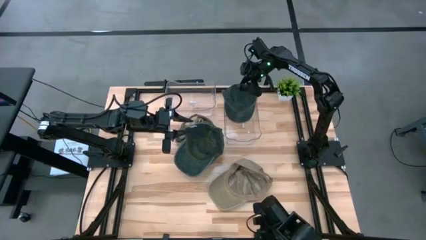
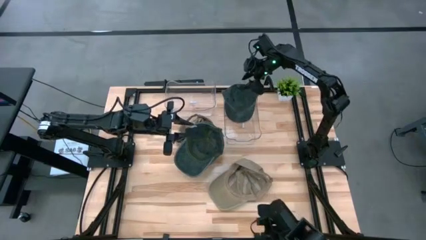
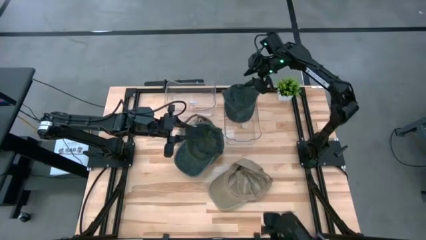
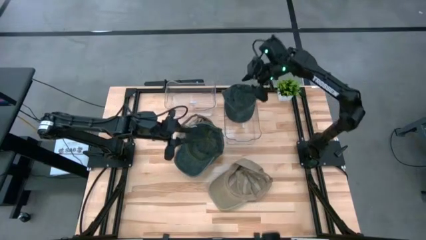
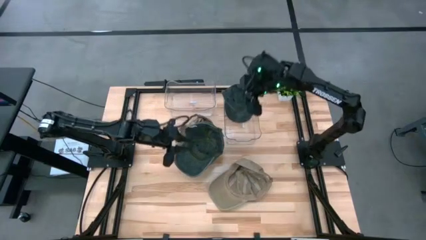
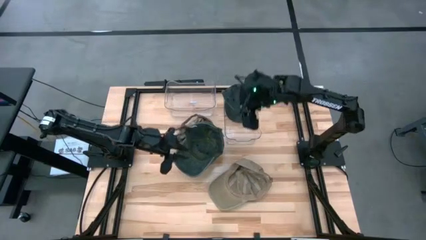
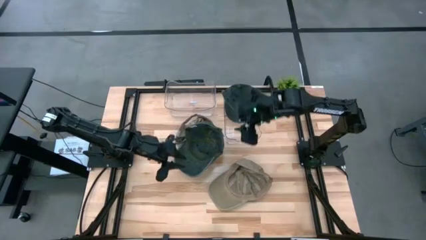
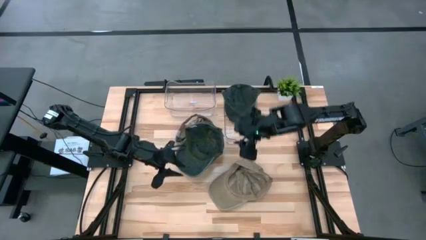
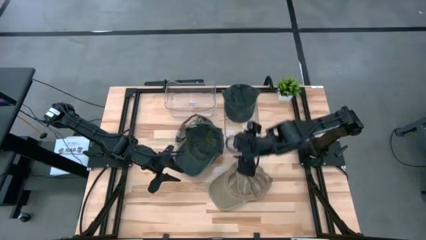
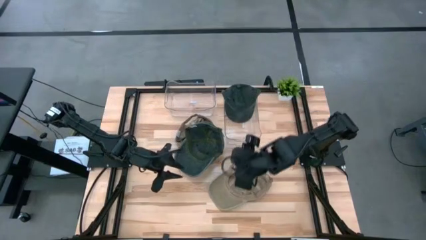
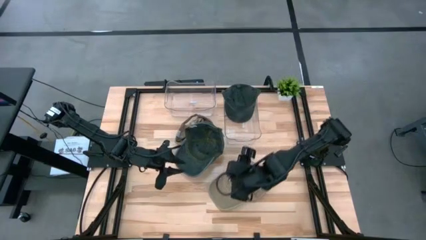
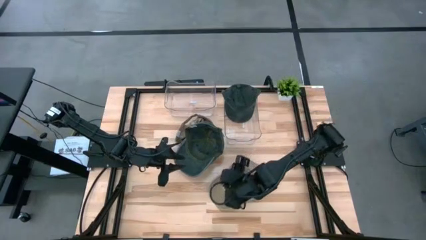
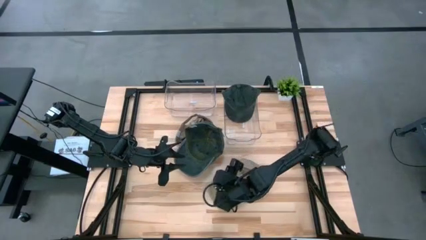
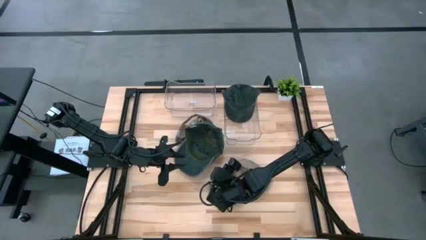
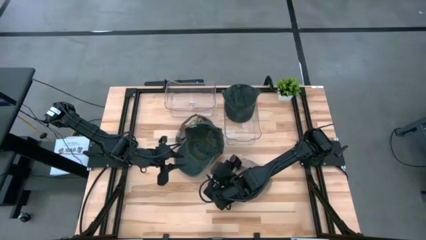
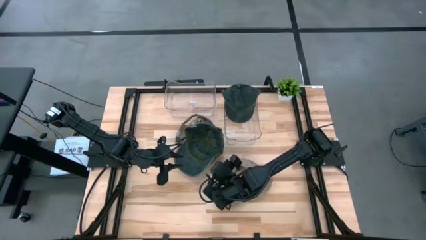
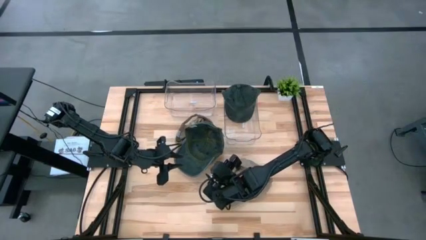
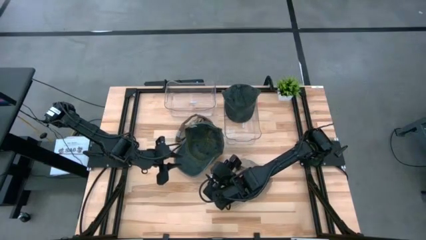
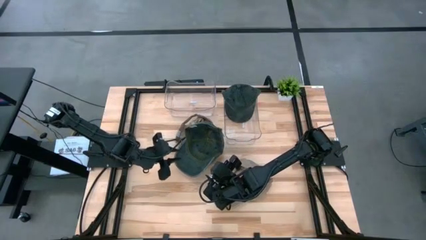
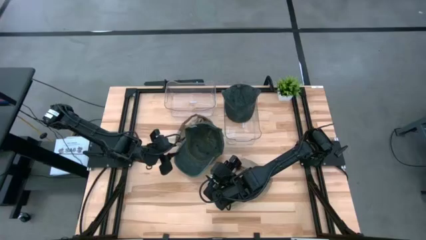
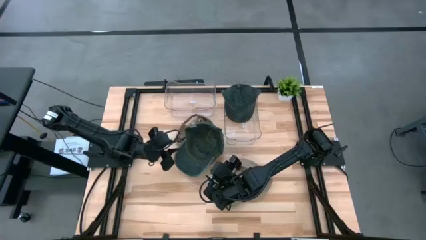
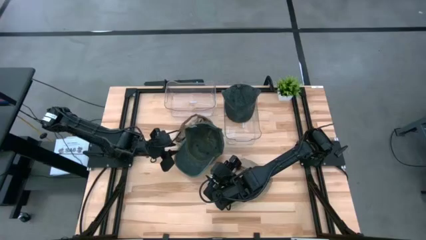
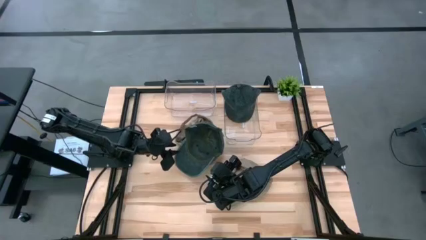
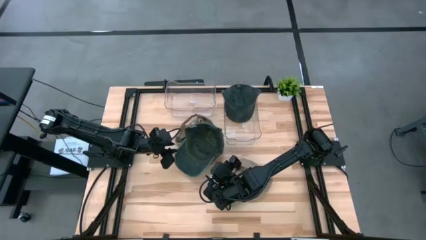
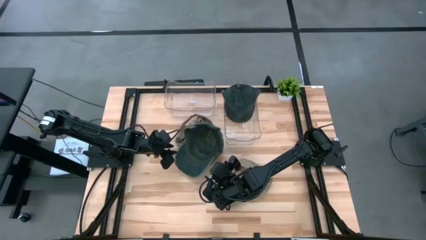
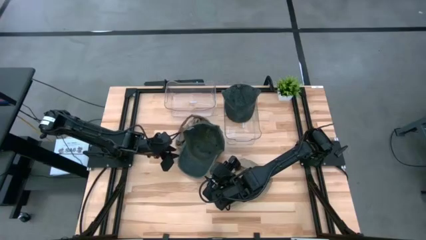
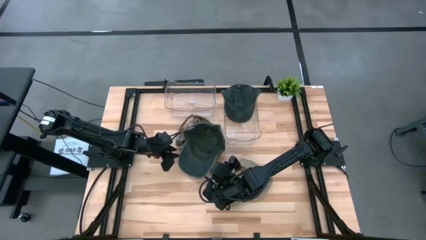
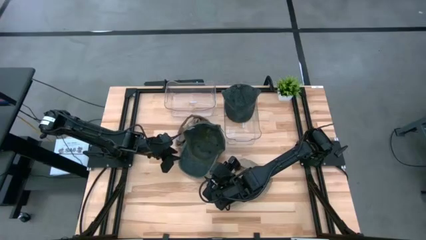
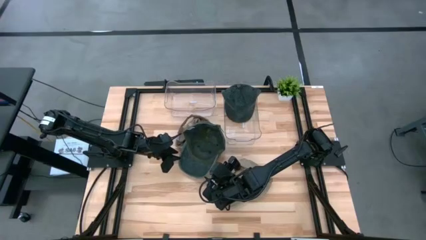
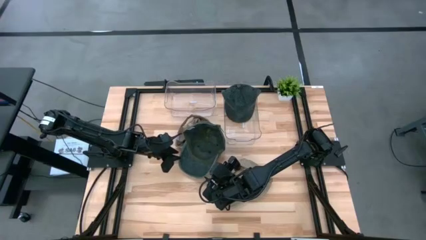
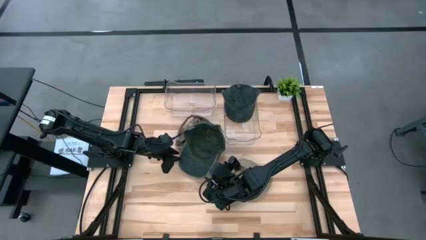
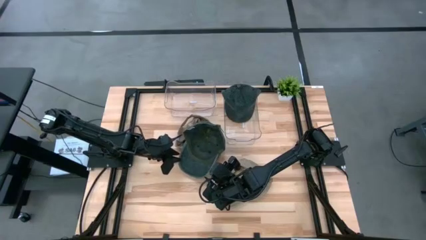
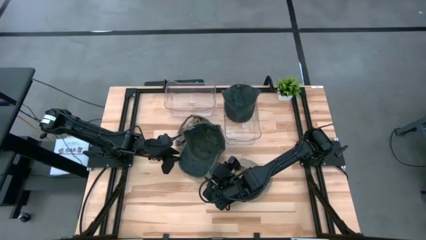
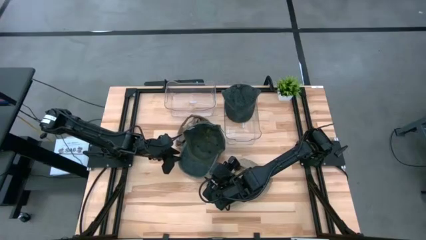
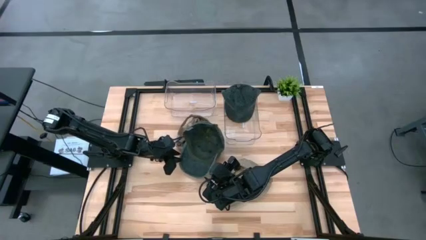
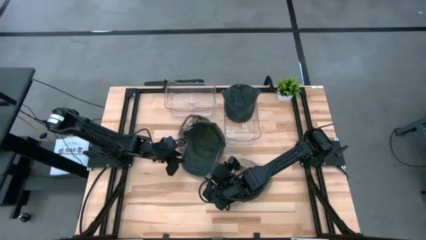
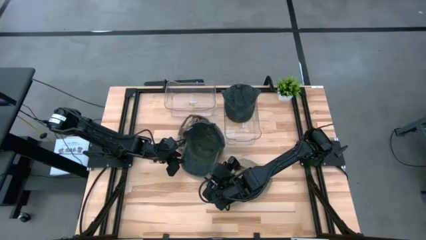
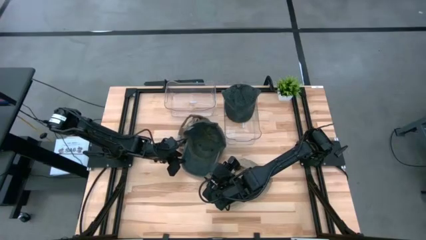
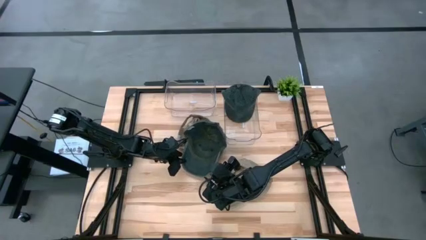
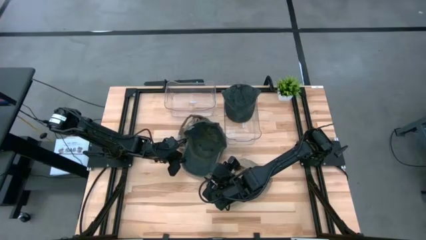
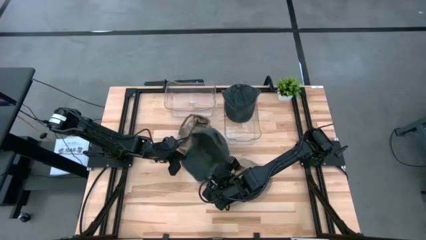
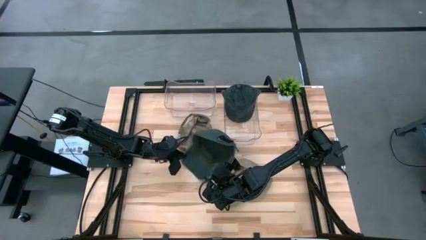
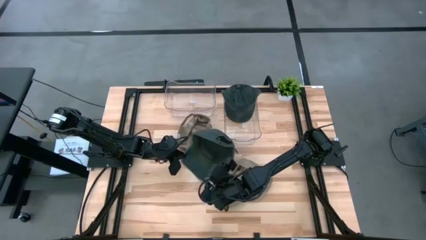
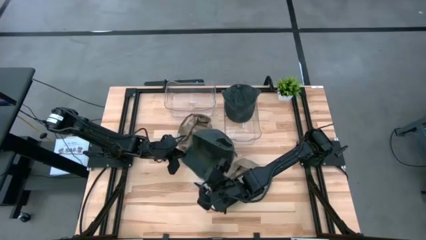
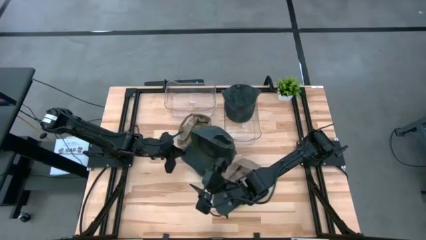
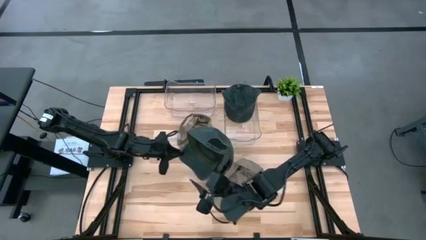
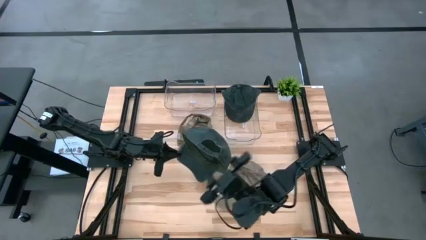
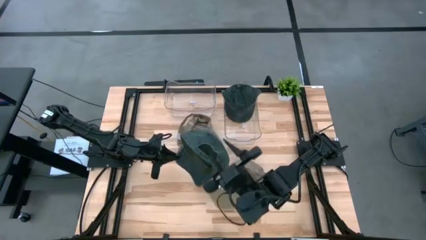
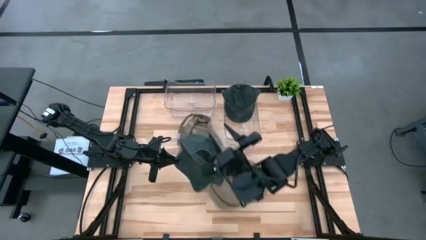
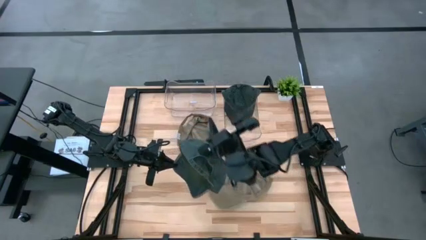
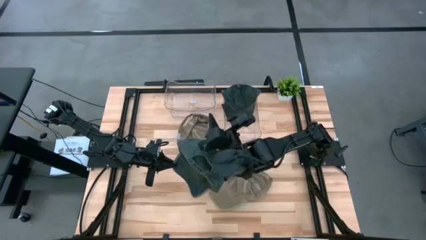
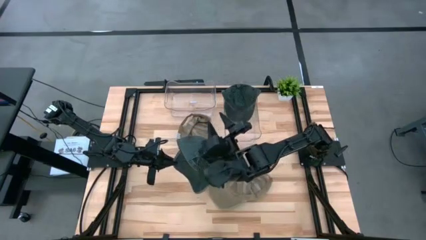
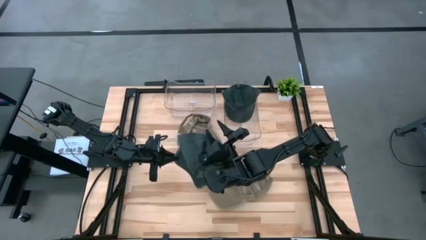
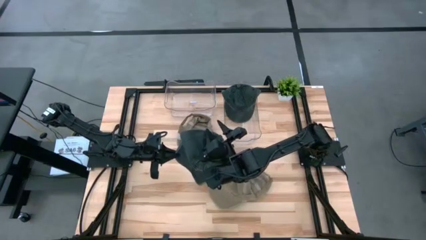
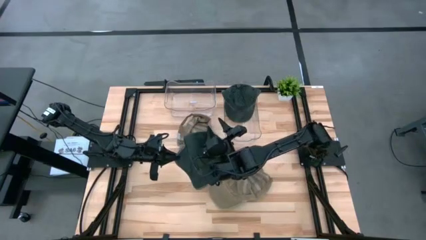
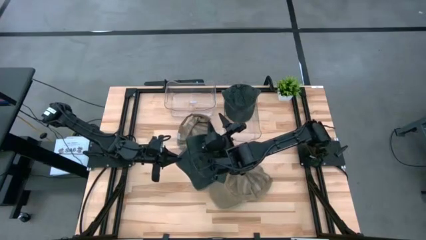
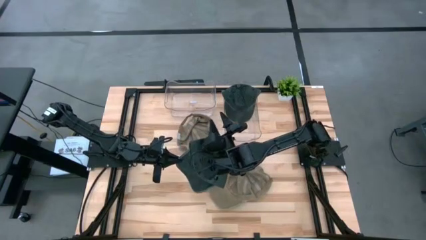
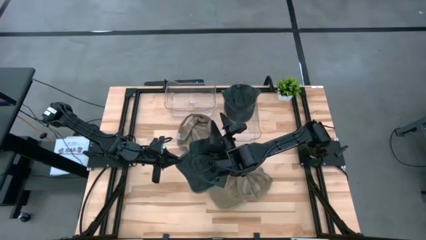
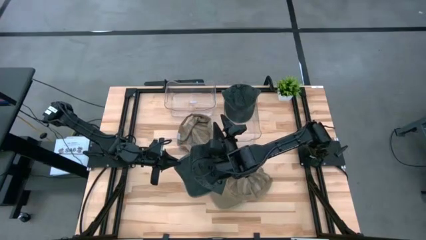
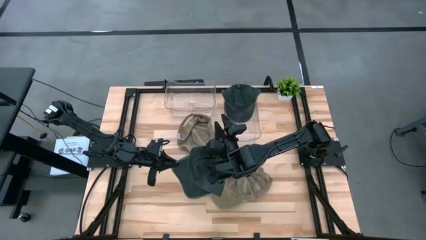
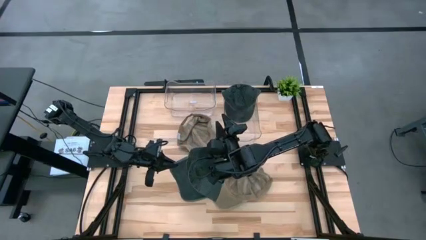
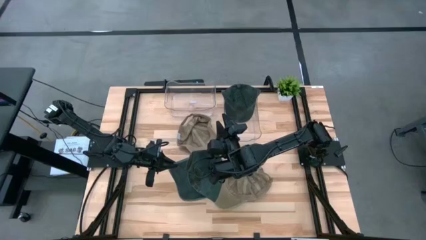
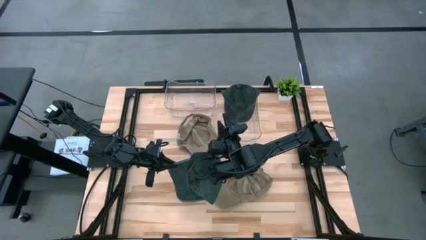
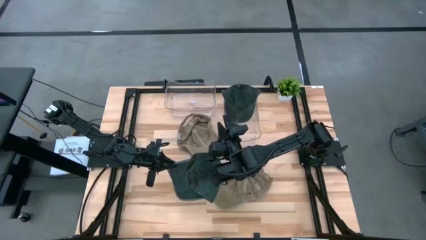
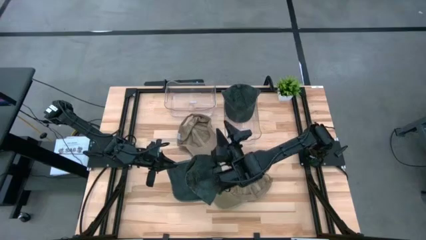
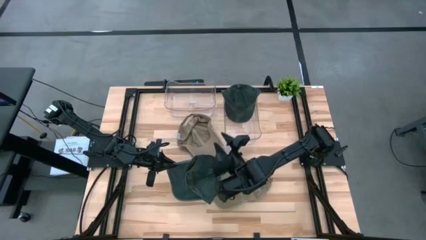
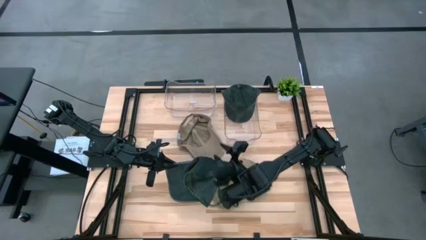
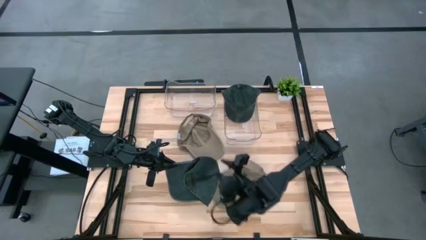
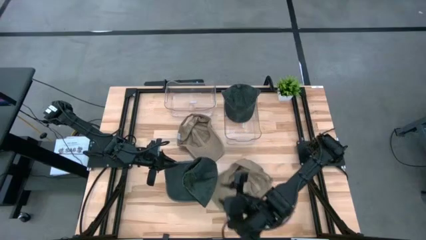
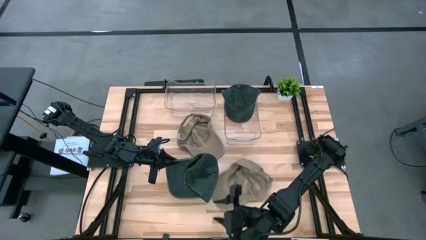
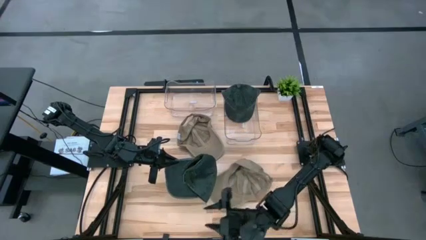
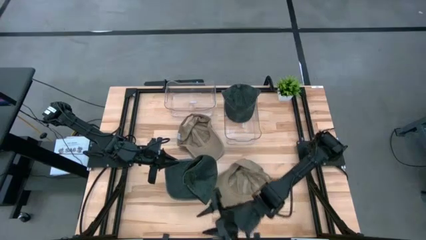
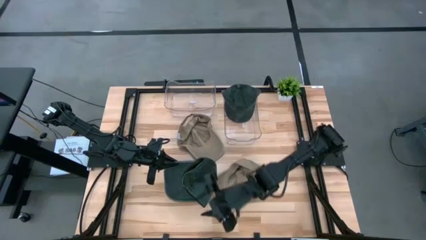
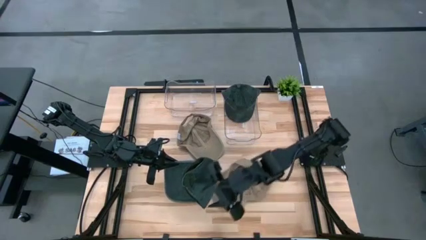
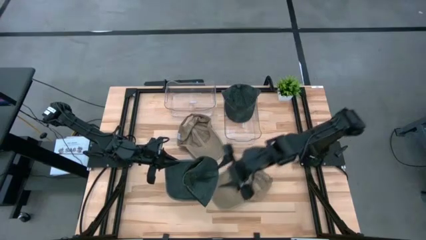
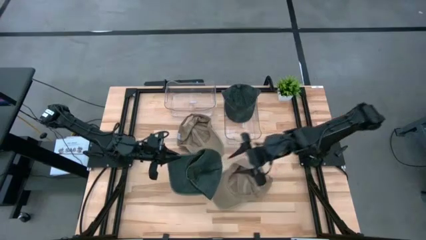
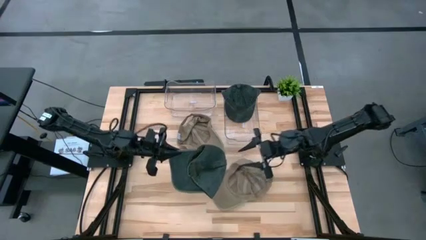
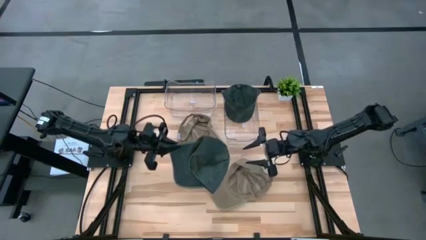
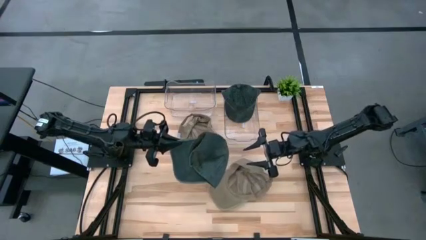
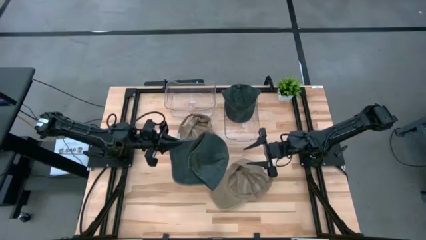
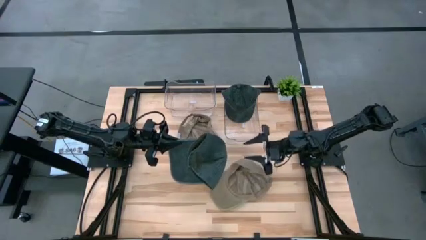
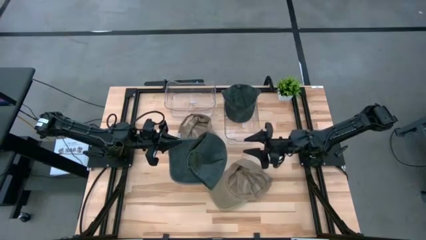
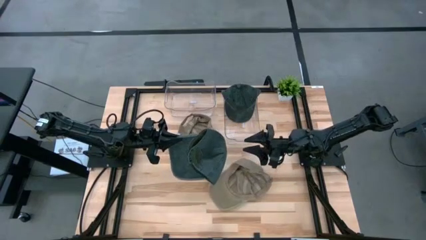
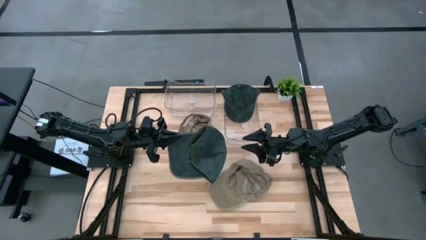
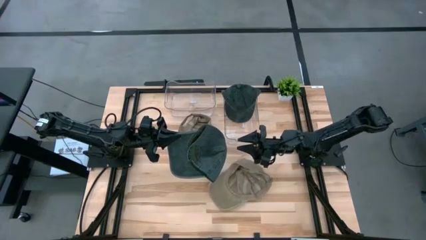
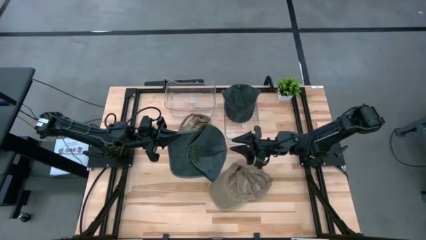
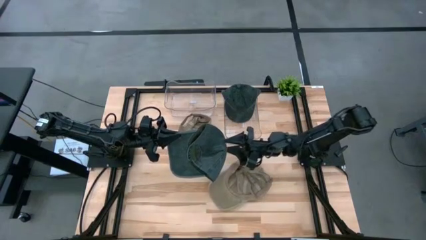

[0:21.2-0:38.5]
Task: Pick & Place hat
Put the gray cap into the right transparent bin
